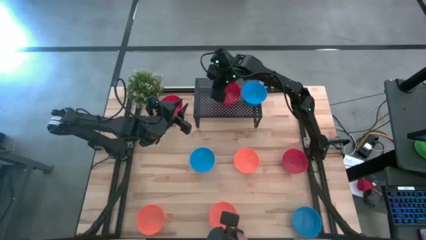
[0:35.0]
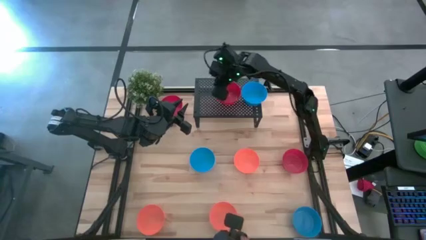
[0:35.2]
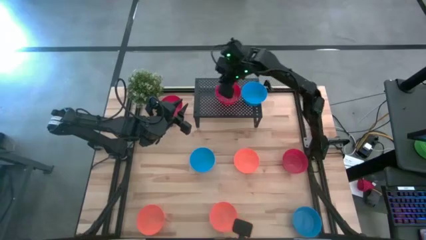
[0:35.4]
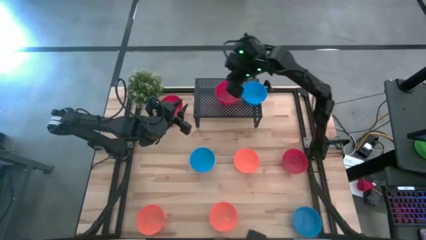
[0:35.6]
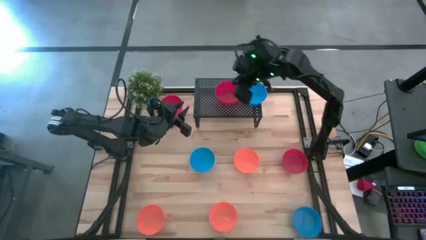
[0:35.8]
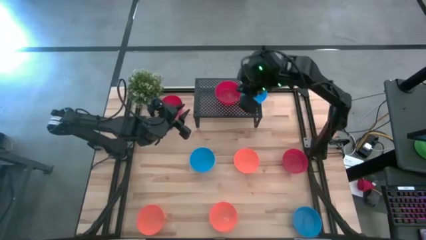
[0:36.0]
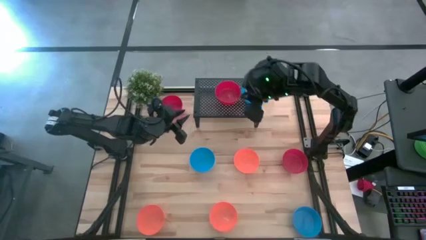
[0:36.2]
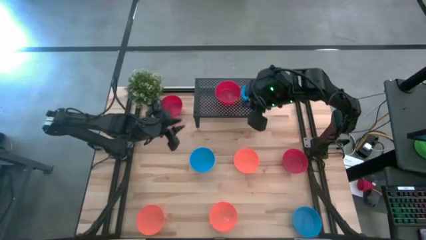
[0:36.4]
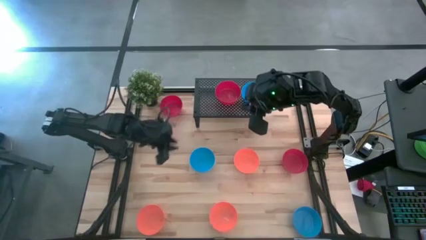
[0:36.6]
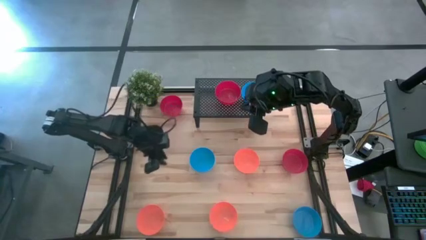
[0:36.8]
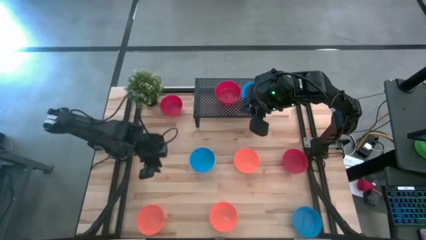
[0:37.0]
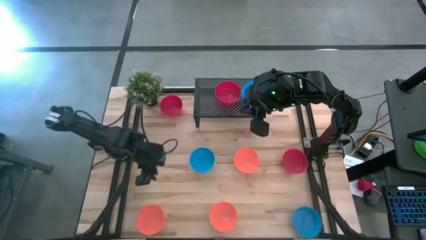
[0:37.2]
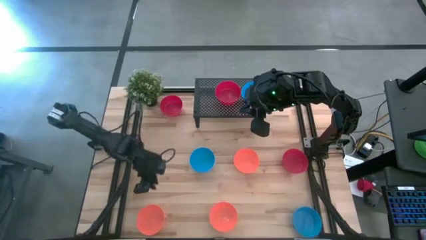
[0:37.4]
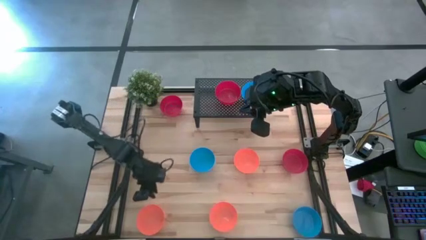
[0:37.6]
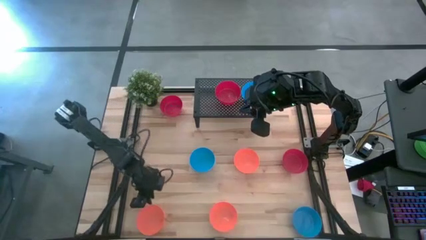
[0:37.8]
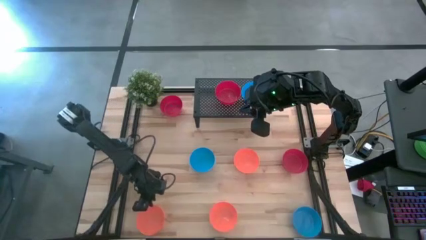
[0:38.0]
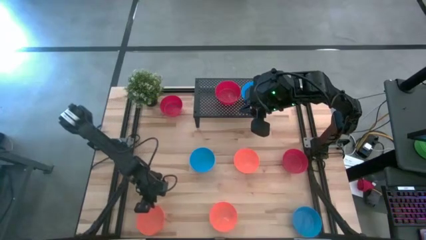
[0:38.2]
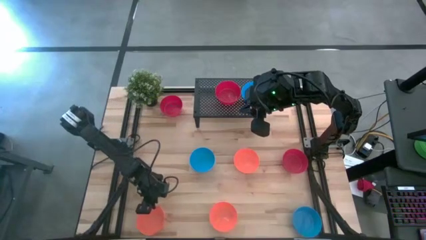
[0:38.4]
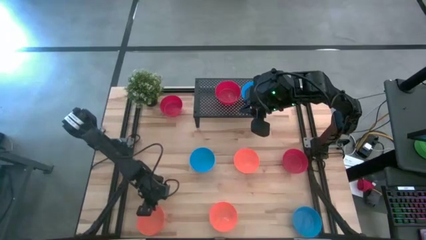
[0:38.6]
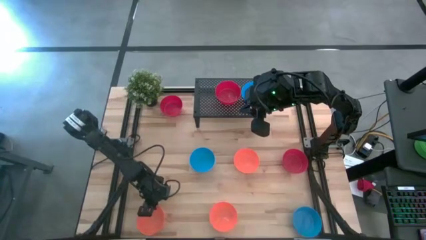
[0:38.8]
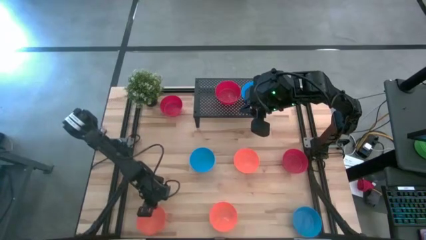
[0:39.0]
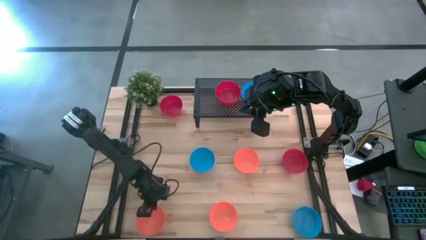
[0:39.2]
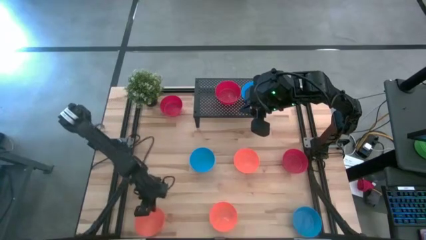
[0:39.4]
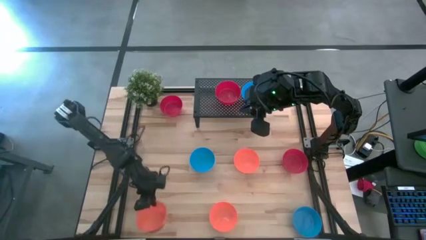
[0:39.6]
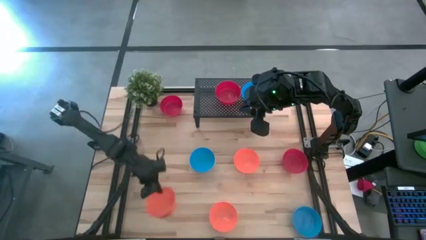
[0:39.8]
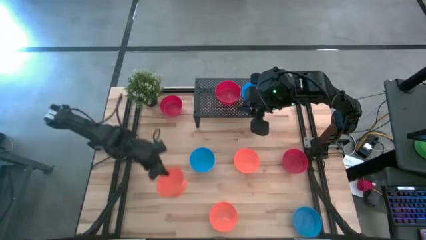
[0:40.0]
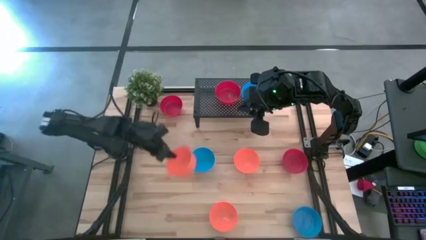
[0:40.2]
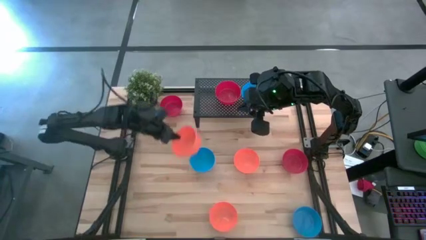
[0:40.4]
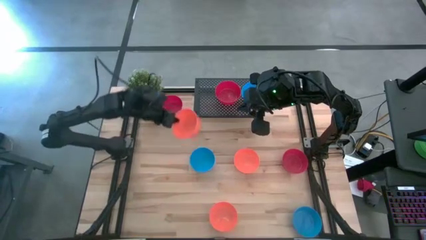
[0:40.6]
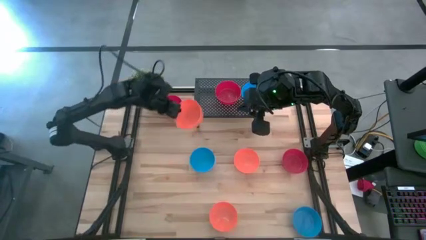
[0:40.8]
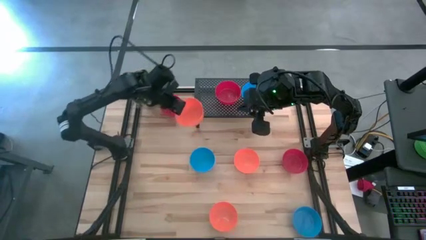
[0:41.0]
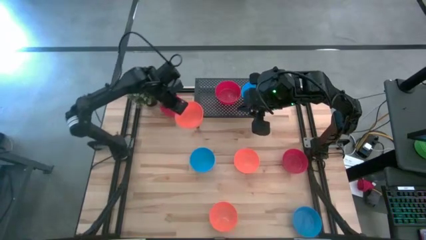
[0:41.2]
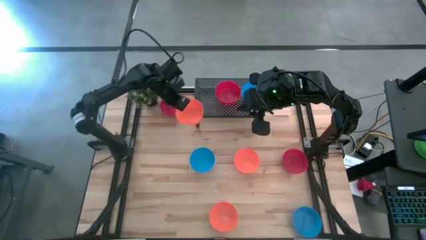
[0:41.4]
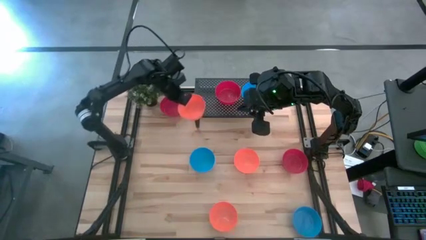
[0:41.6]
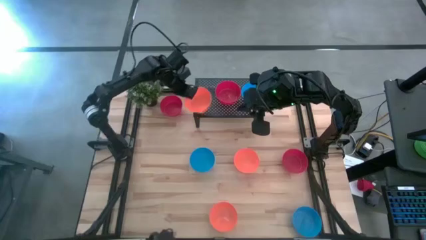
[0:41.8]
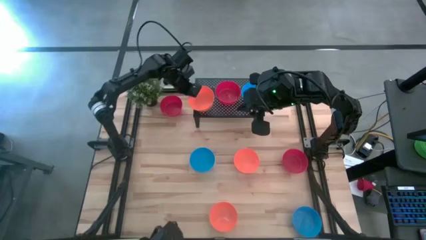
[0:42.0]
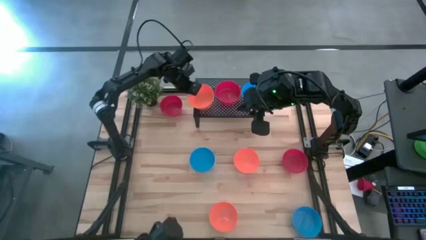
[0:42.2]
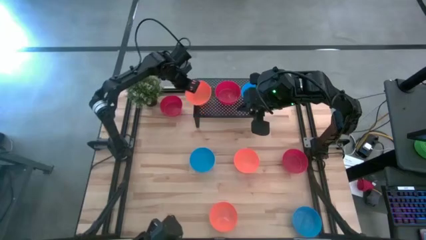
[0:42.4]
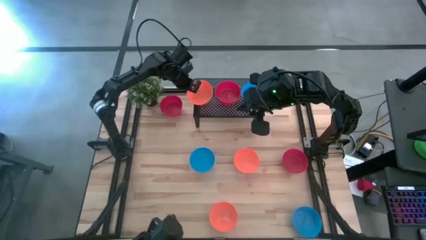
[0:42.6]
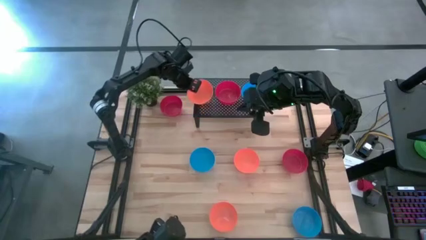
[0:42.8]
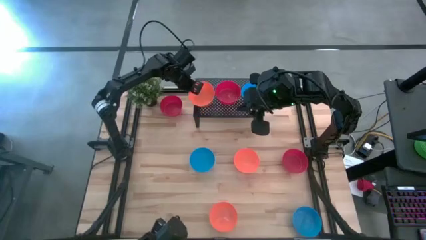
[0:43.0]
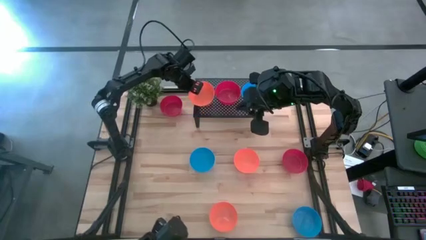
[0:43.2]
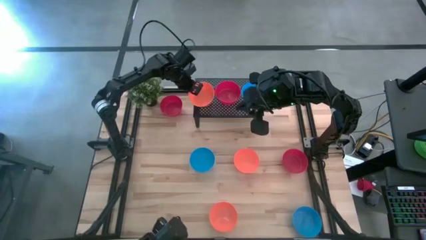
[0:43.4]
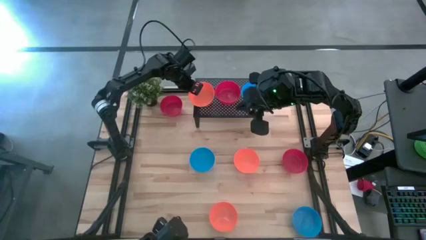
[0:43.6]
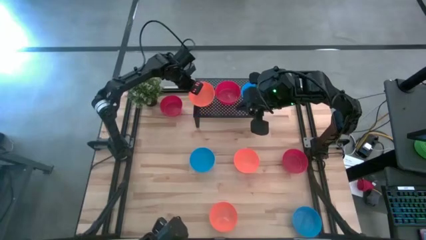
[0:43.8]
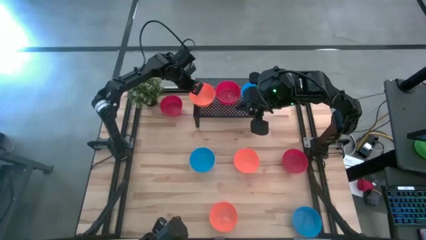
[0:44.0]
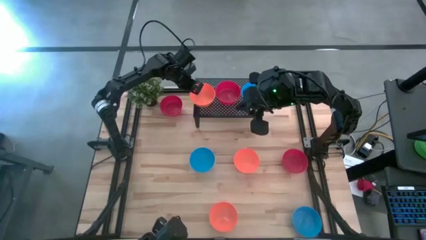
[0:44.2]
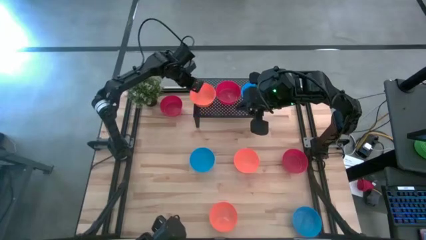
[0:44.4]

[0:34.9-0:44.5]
Task: Pick & Place Mini bowls
Put the bottom left orange bowl on the shelf
